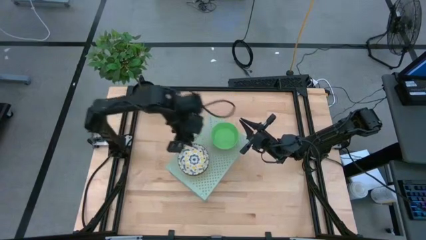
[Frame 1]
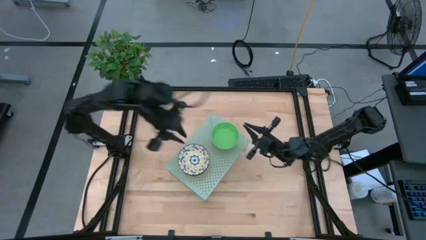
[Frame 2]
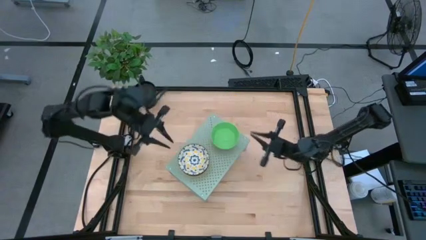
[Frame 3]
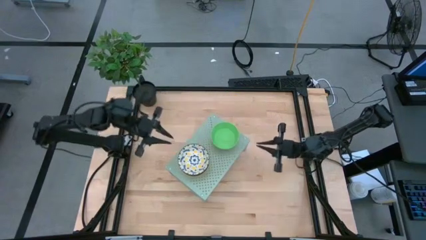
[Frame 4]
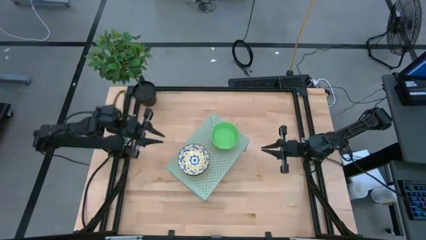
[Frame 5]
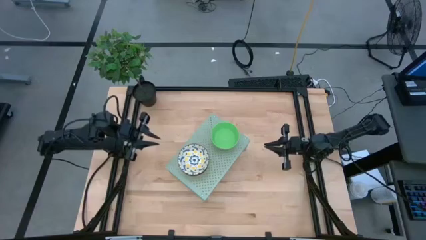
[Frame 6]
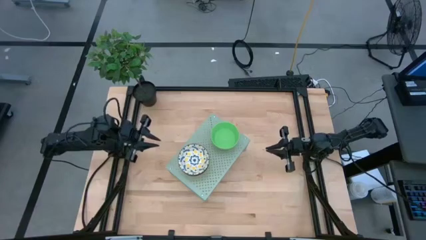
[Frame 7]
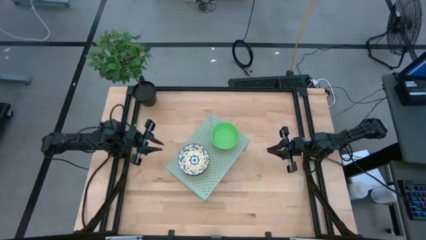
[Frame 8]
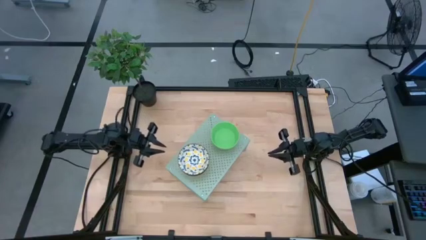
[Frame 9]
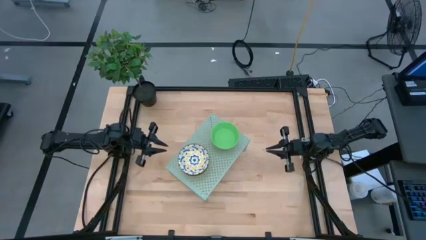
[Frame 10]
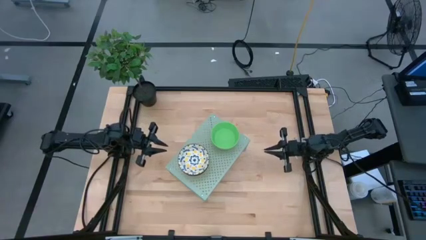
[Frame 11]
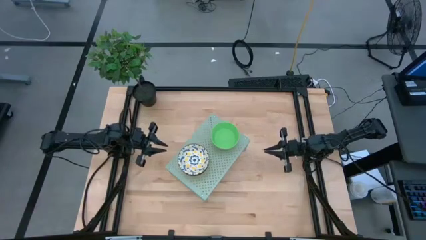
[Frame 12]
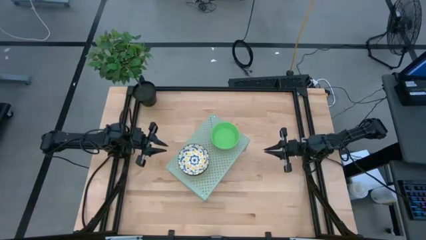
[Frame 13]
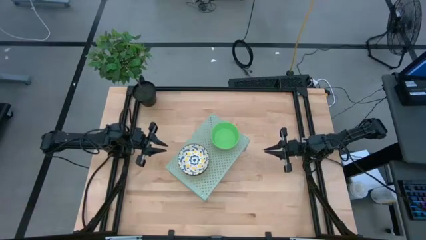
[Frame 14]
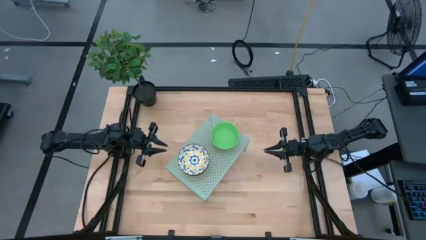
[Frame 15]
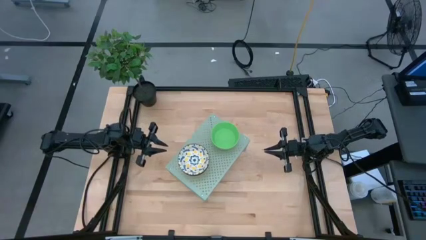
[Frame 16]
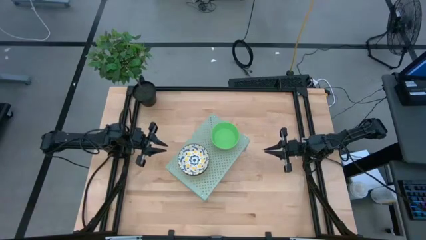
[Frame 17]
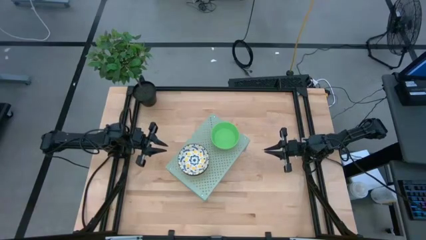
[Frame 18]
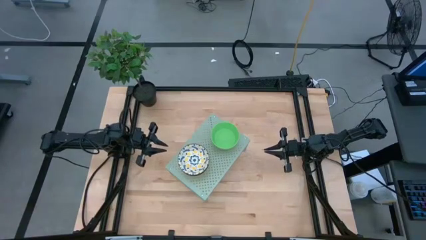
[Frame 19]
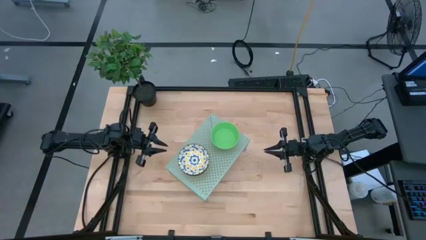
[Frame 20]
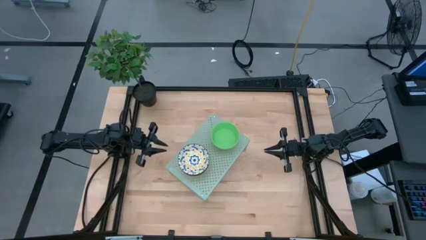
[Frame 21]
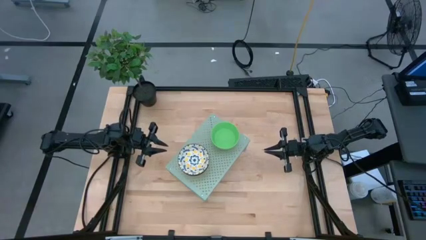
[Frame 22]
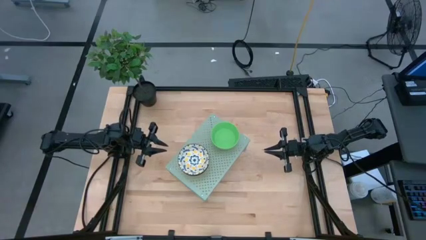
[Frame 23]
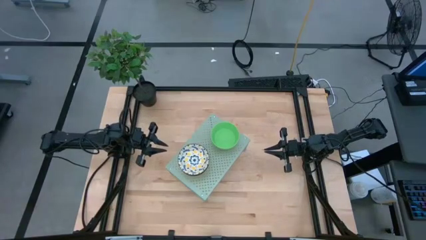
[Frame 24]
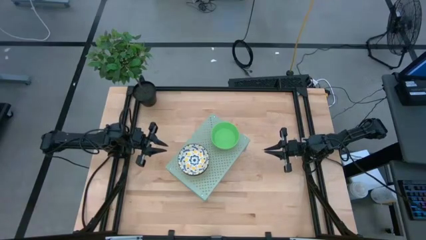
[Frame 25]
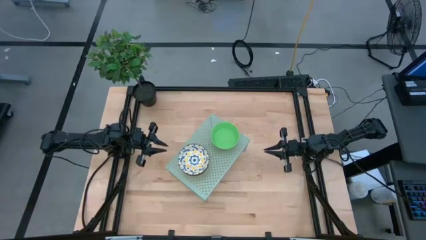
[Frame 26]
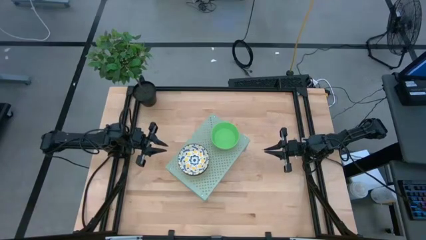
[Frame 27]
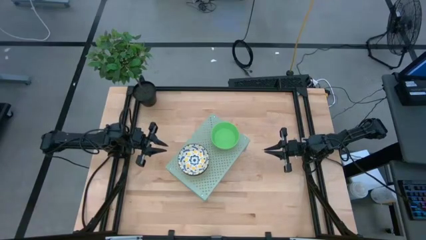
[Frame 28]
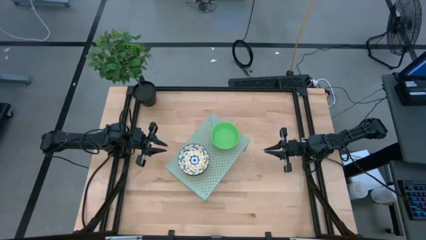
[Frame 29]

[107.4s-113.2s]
Task: Pick & Place Mini bowls
Return to Home Position

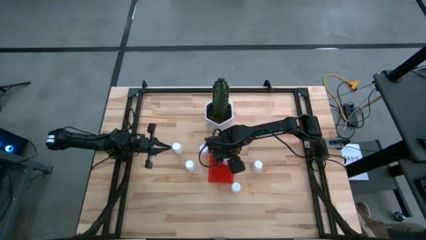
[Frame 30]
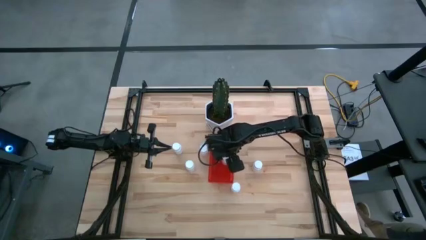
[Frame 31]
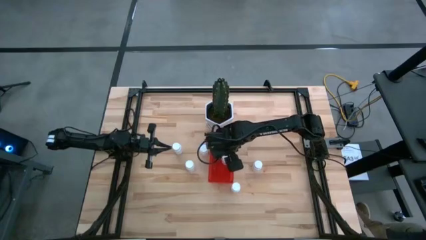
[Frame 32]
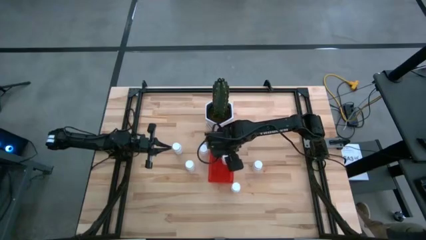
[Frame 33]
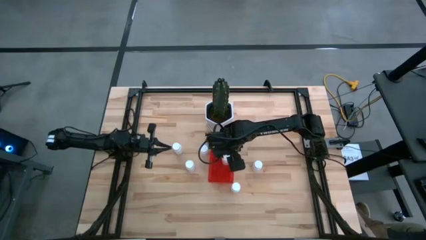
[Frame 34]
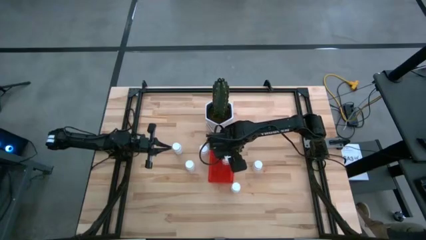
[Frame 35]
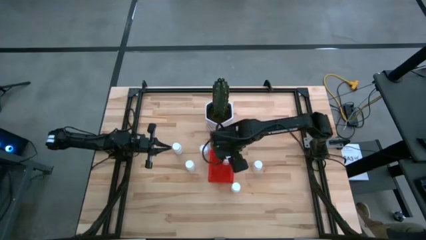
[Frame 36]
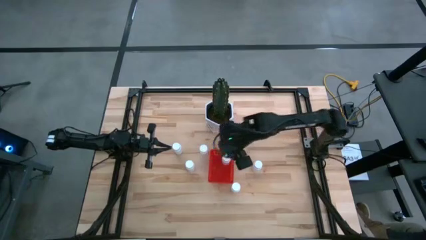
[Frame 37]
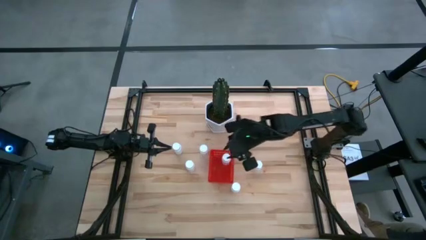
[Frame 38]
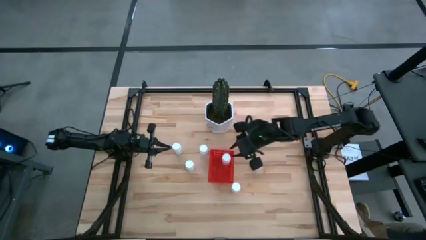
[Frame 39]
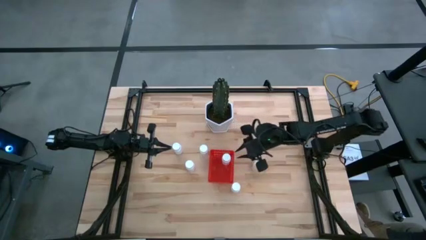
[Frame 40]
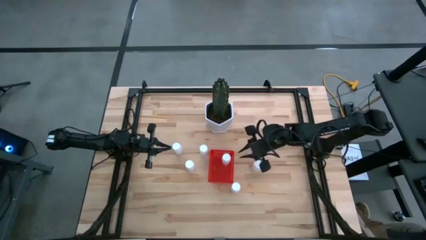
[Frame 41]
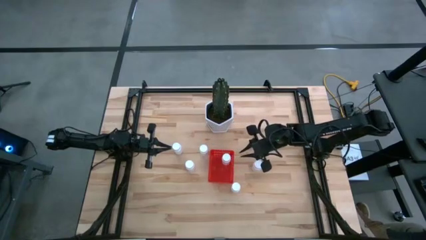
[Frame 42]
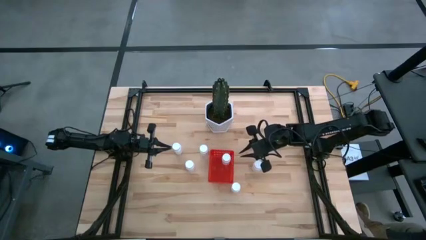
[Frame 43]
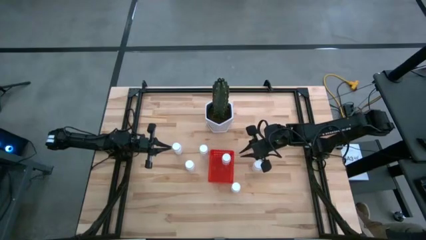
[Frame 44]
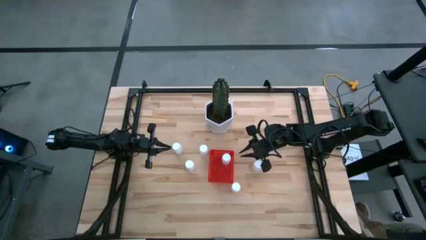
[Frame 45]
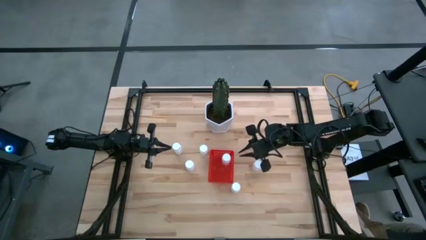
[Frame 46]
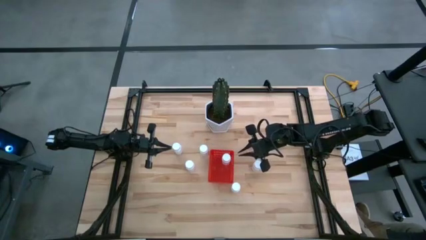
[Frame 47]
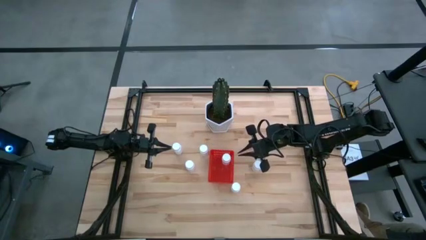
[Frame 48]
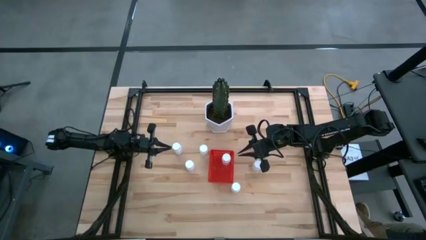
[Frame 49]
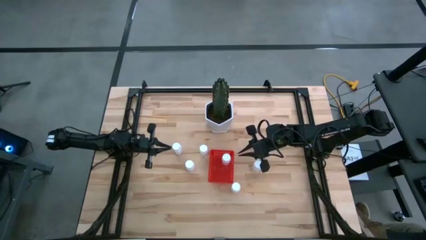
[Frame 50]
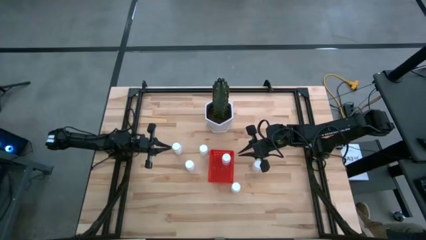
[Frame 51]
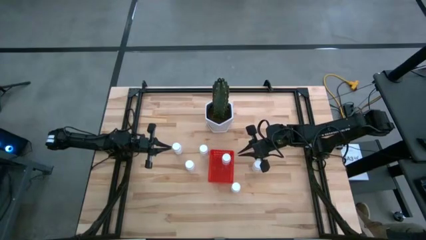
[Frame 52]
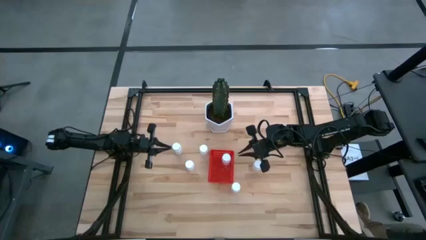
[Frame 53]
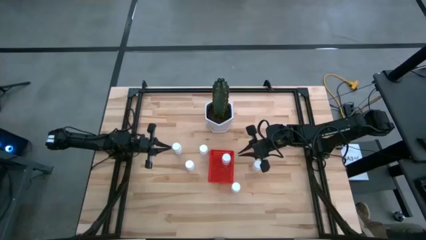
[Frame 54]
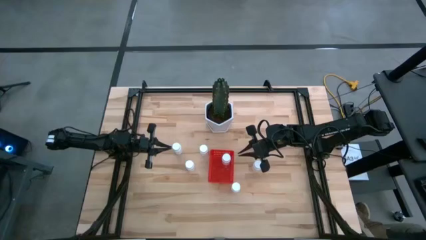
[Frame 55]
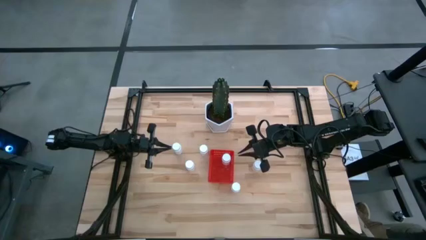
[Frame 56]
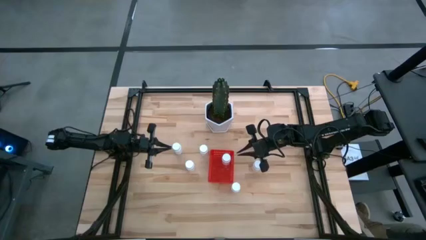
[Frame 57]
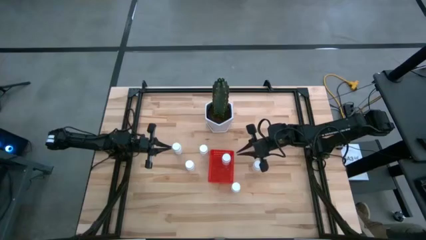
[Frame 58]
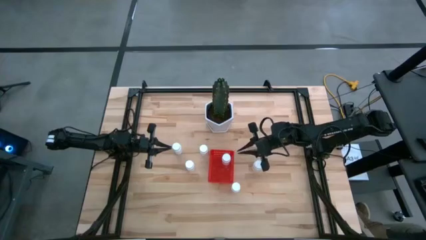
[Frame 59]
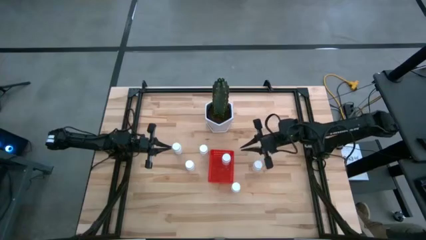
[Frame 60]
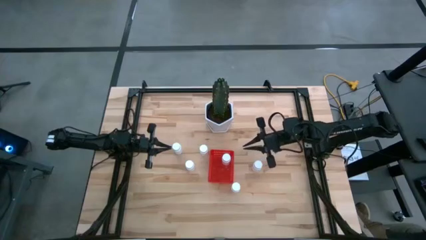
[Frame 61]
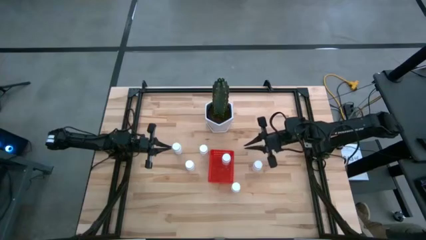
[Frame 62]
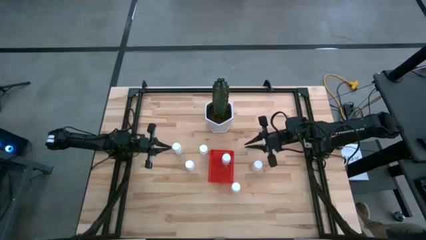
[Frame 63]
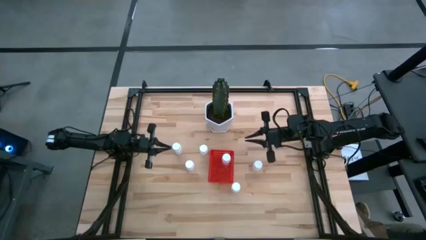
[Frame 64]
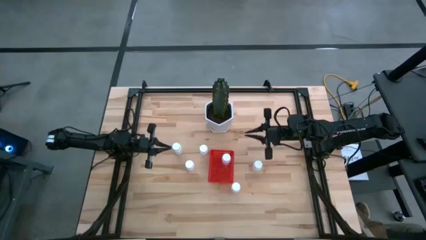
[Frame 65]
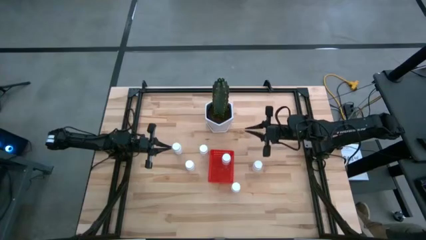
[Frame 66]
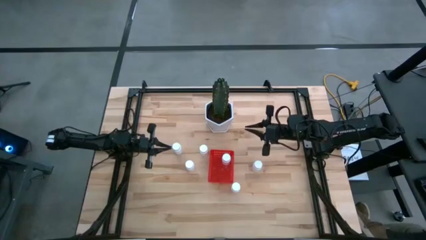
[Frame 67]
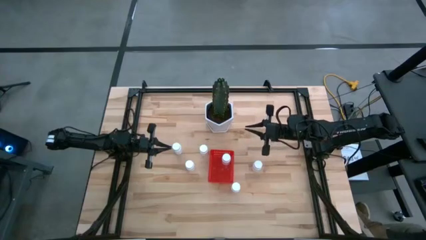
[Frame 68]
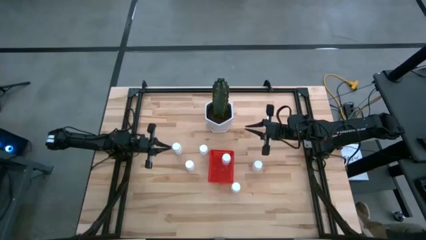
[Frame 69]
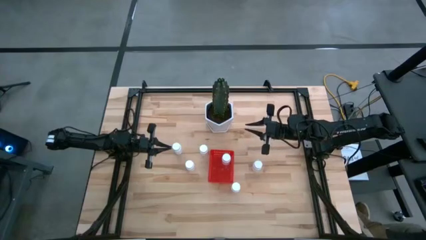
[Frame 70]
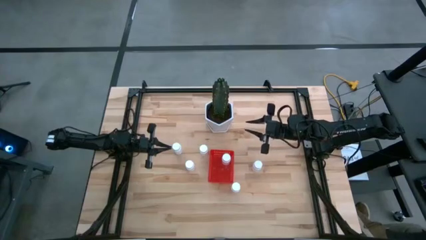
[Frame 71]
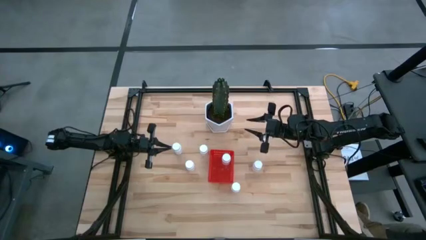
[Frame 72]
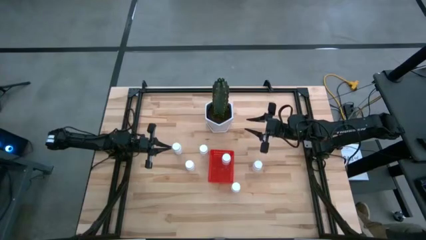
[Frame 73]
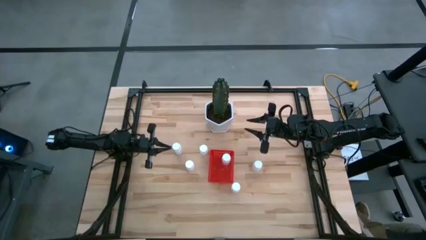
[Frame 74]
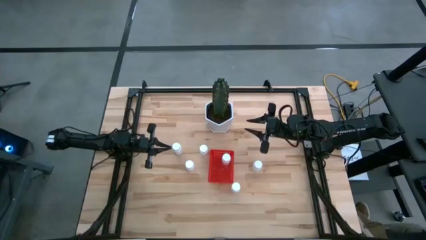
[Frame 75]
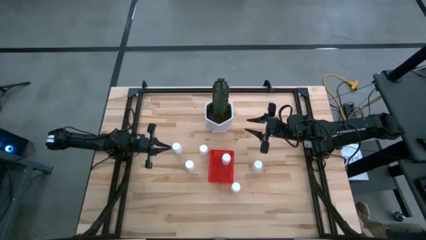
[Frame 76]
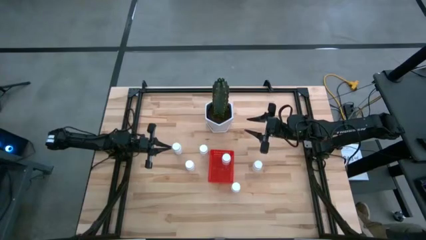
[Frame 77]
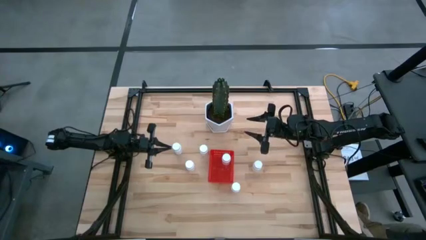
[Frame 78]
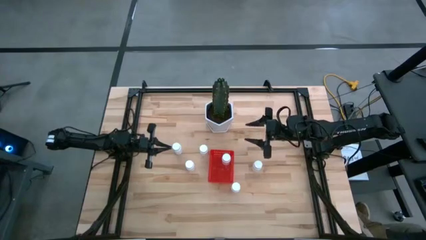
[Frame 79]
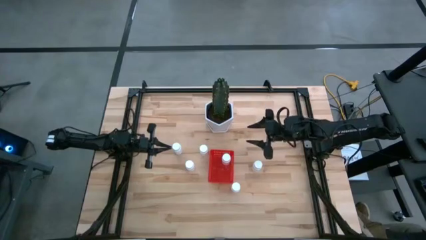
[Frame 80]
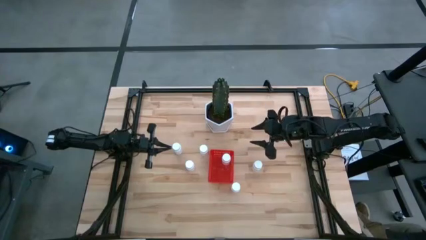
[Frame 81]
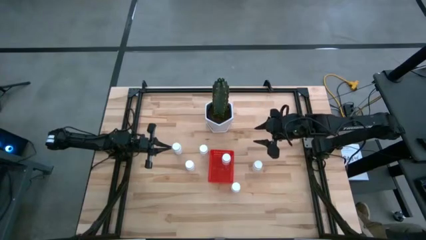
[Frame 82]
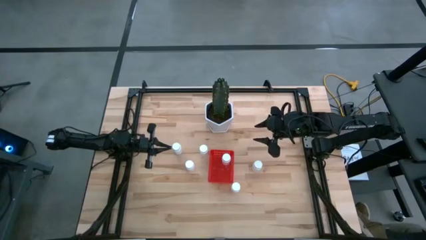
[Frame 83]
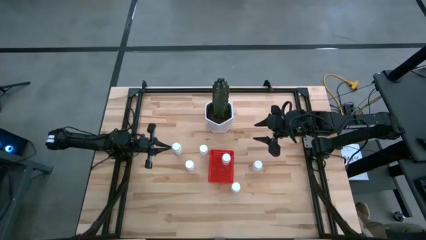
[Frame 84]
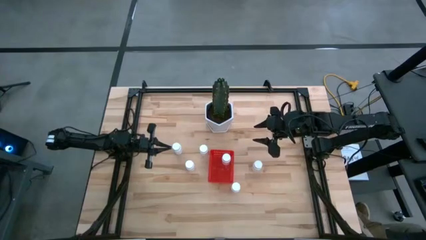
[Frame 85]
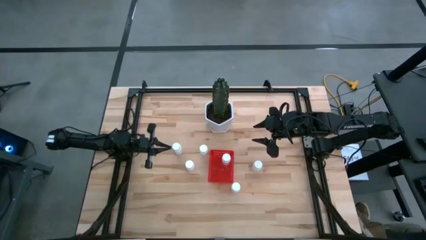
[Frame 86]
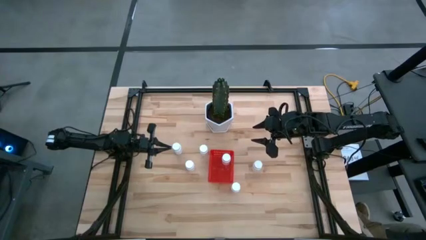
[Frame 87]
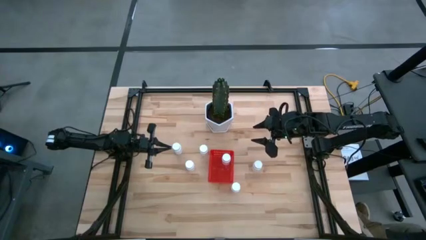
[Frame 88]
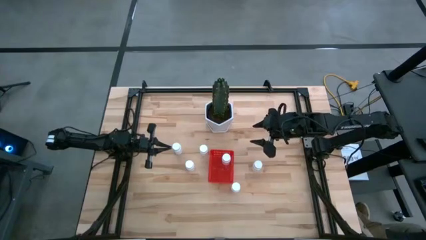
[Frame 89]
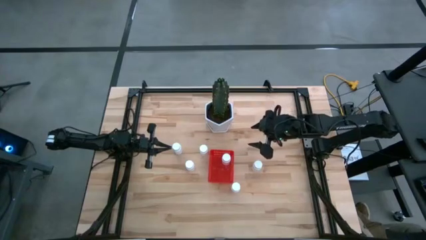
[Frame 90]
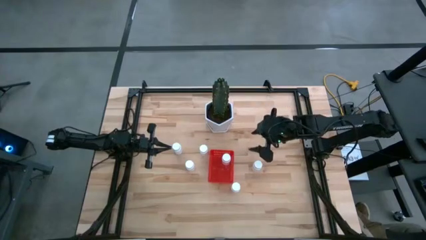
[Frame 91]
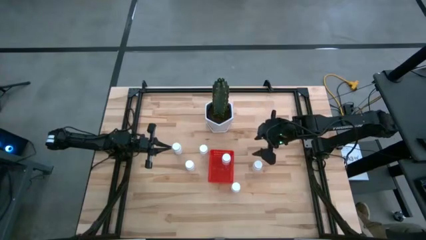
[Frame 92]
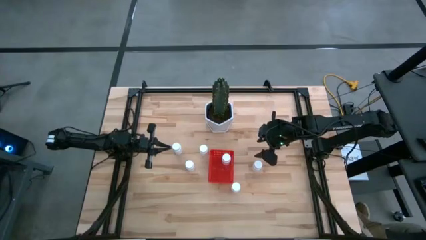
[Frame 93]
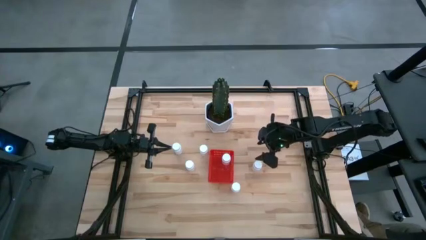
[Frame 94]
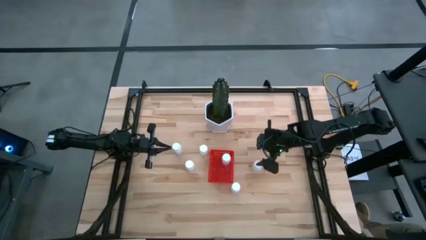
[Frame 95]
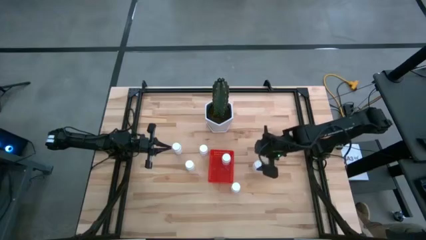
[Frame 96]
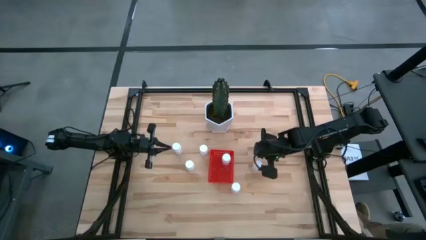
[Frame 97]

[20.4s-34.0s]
Task: Pick and place pill bottles into a basket
Put the white pill bottle into the red bin
